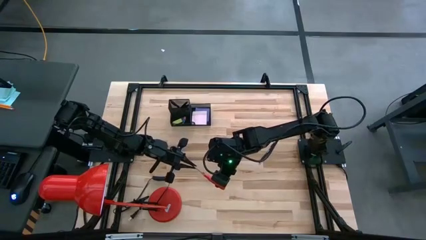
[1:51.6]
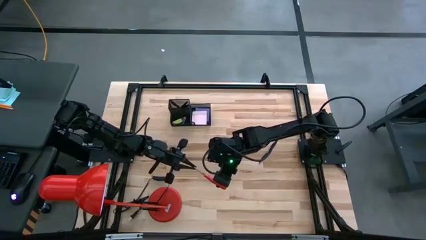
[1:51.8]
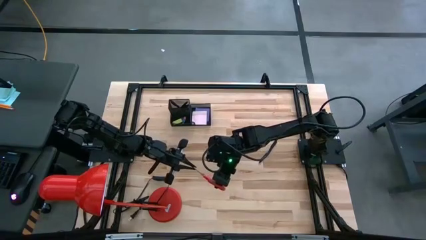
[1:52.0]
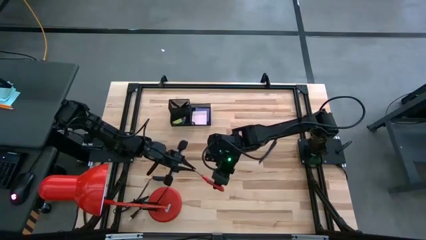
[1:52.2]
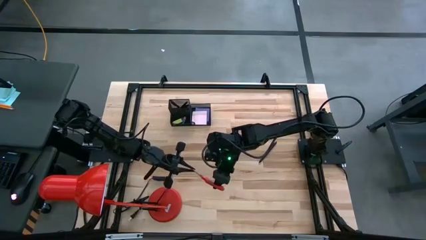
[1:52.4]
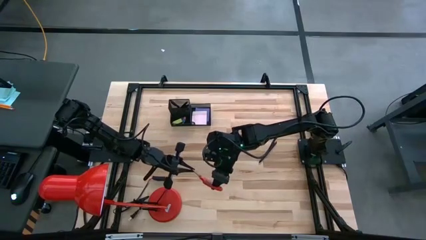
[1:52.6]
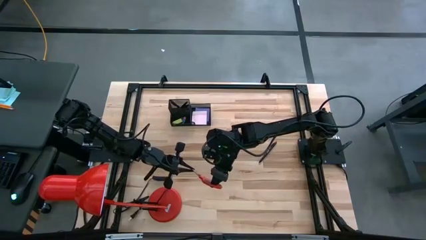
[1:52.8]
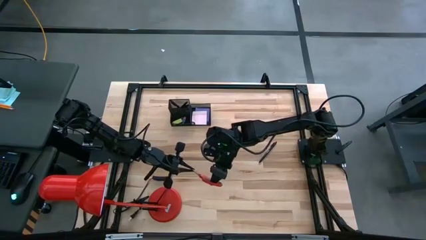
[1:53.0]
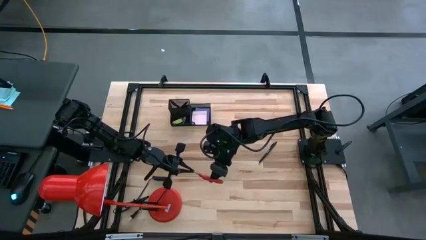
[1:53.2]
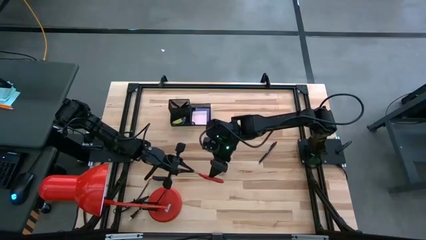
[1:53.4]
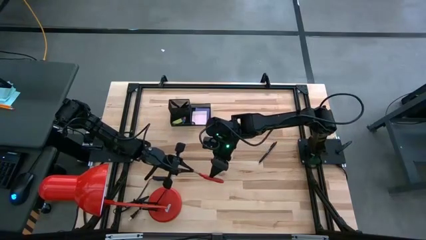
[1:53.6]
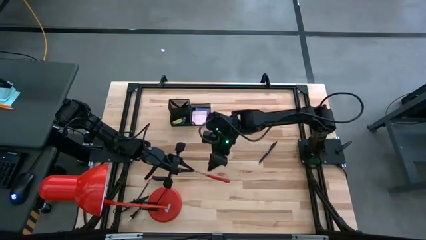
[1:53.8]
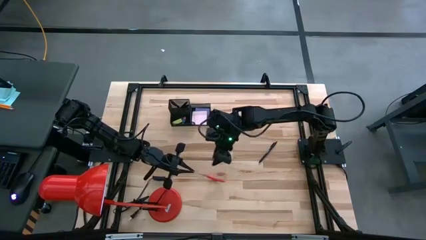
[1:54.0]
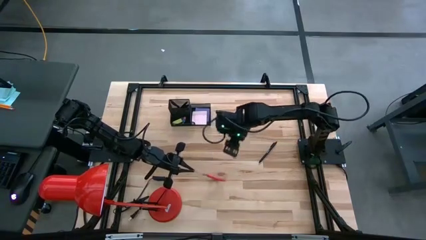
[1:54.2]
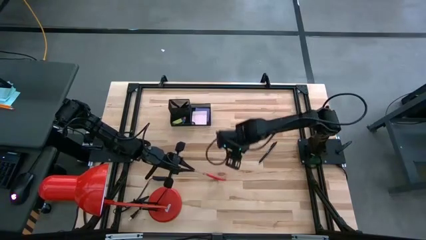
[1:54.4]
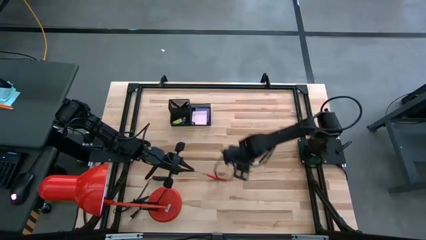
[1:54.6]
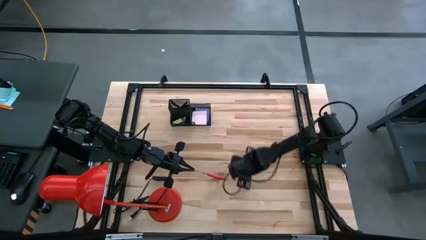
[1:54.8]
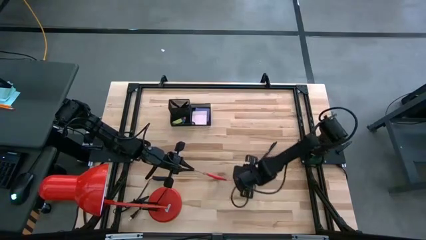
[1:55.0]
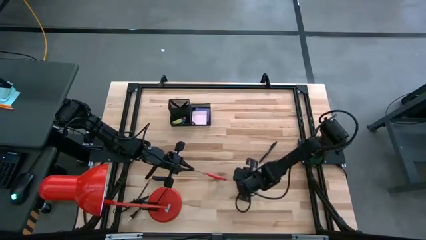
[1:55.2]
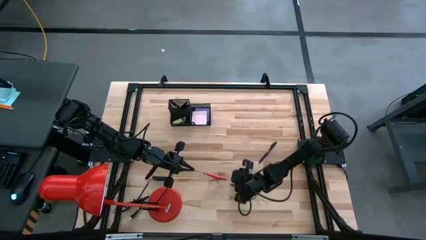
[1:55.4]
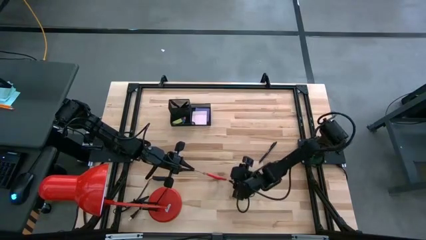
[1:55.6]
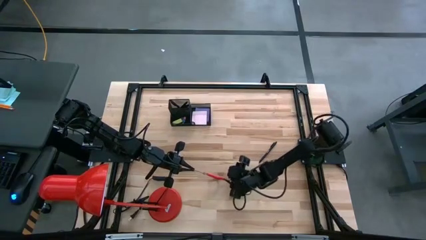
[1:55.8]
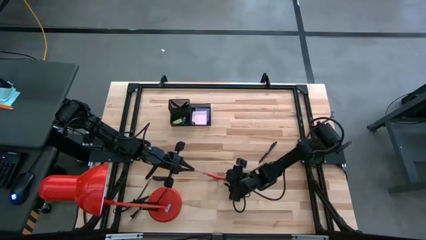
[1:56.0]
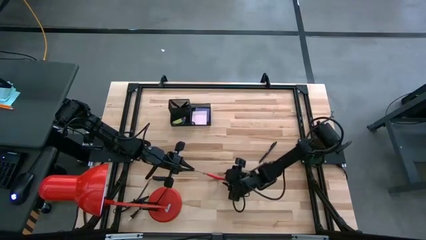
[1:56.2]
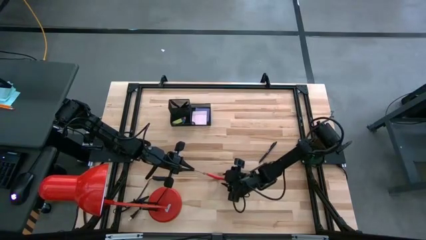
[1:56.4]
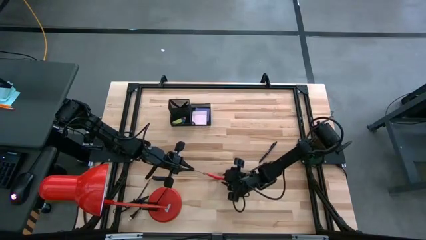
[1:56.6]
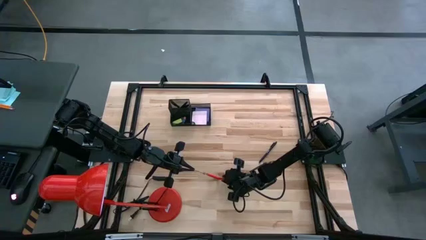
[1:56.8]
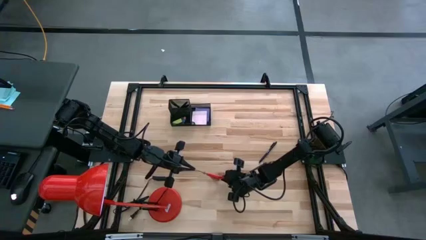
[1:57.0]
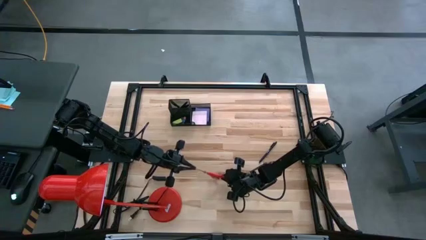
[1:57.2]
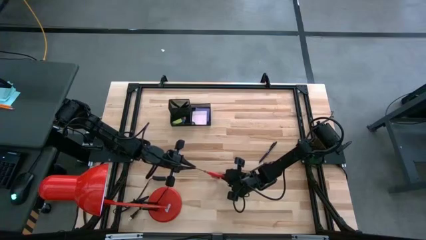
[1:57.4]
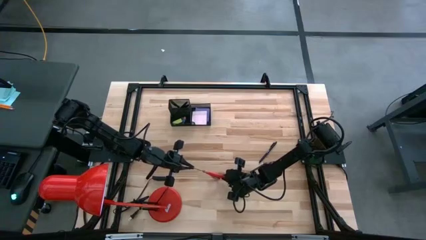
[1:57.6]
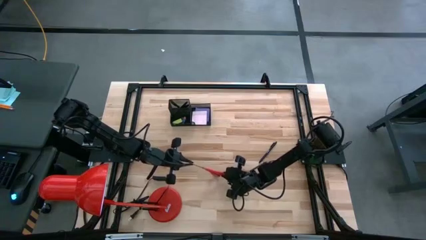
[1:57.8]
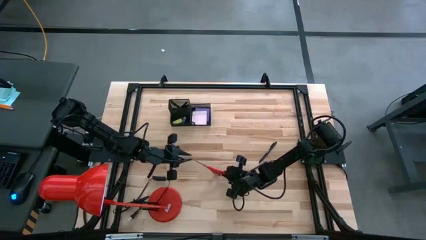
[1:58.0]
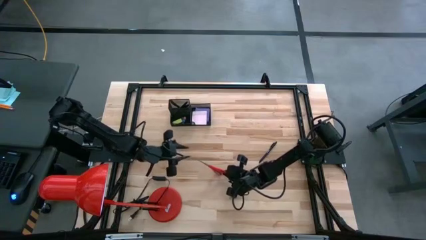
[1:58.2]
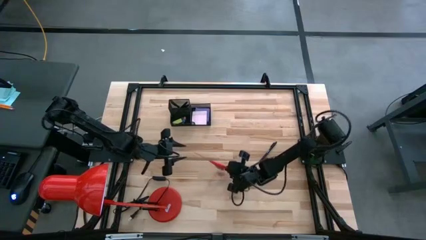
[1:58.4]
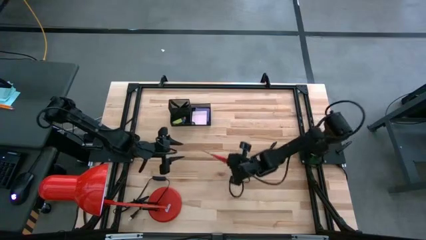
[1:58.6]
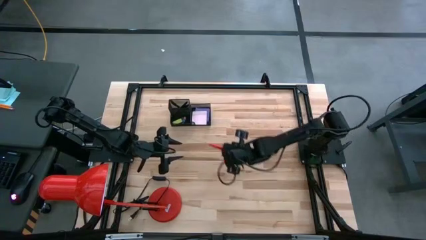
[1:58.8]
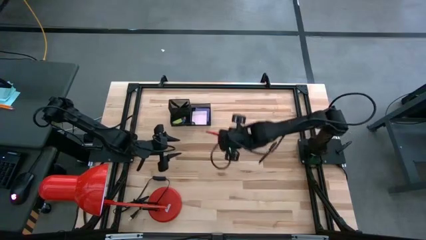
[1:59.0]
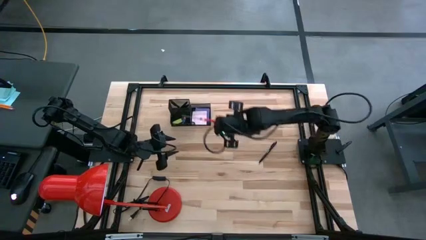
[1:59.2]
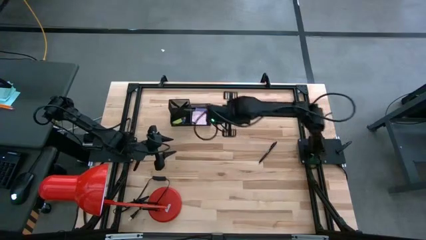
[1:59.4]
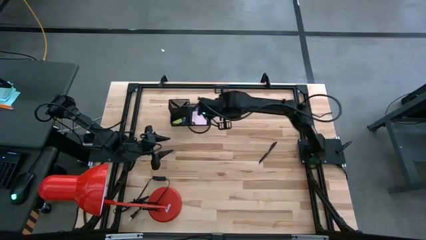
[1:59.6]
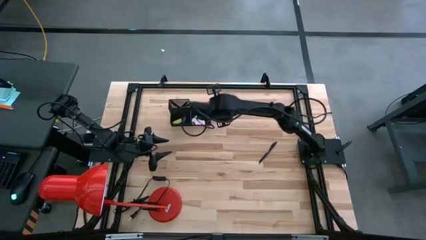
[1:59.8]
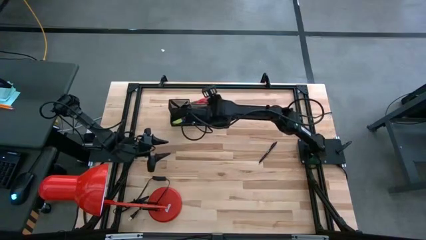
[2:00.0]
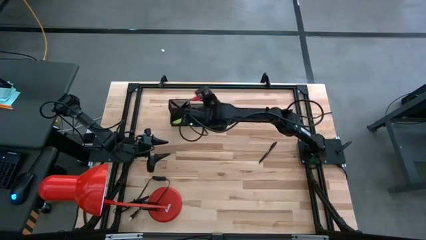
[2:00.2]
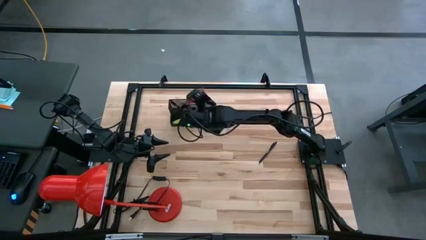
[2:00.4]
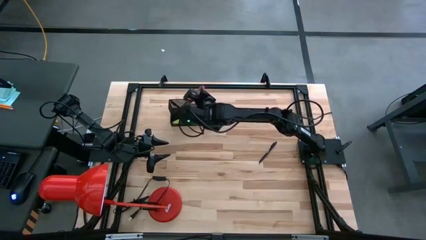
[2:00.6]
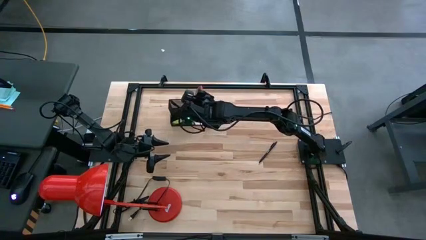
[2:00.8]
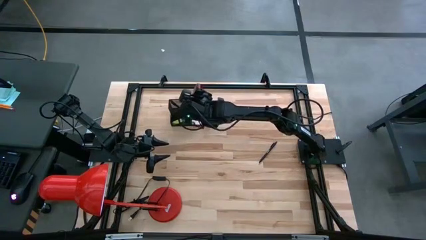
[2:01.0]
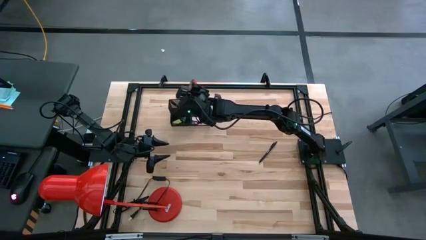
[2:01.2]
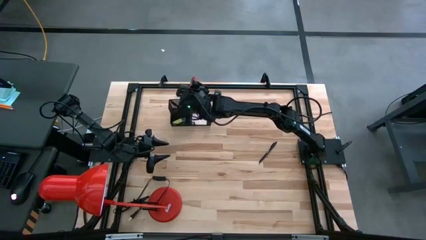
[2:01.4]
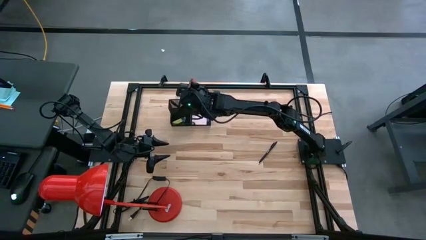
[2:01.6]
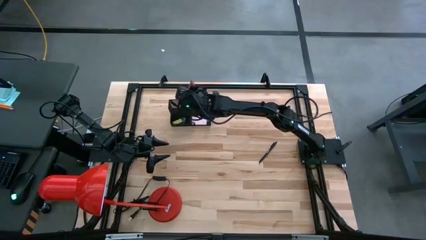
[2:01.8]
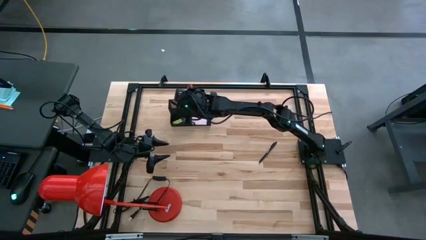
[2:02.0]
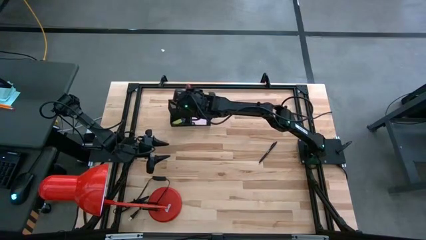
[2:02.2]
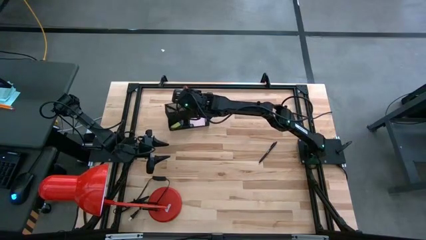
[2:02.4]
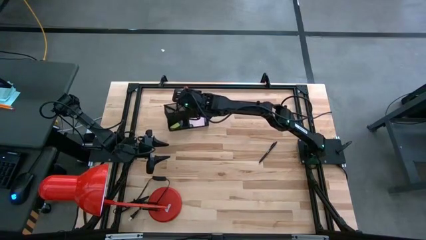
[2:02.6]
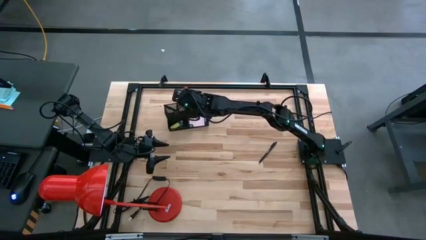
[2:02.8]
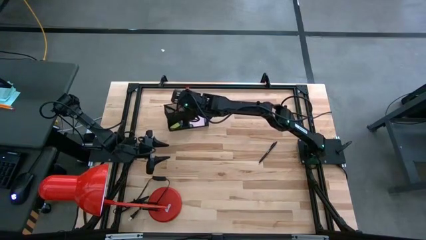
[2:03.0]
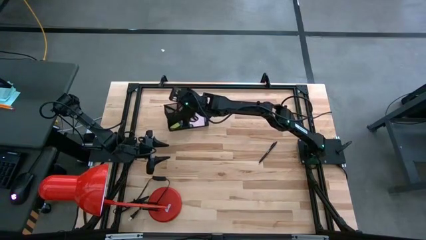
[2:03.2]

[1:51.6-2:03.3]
Task: Pick and place office supplies into organizer
Put the red scissors into the desk organizer

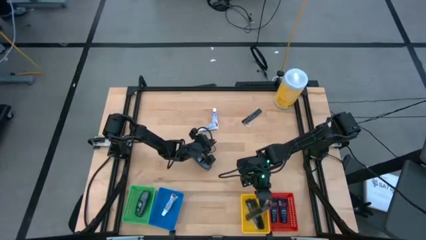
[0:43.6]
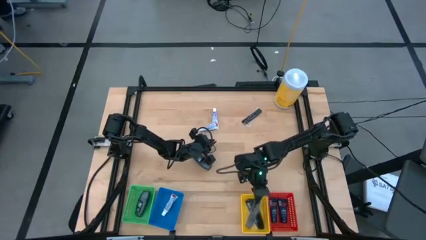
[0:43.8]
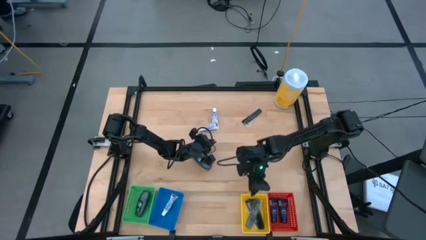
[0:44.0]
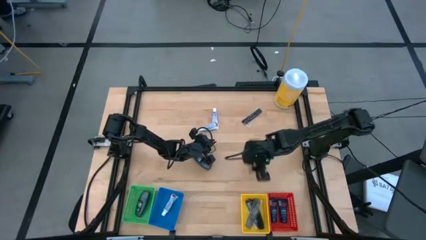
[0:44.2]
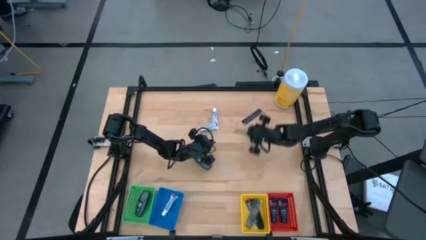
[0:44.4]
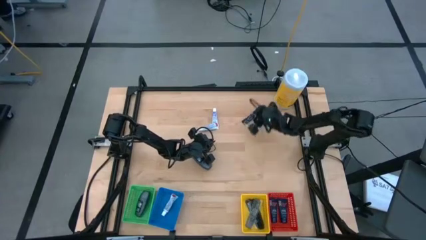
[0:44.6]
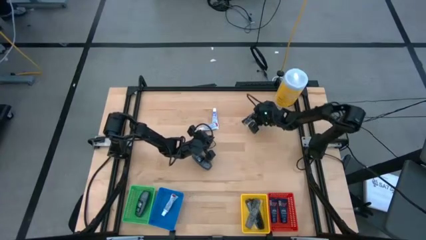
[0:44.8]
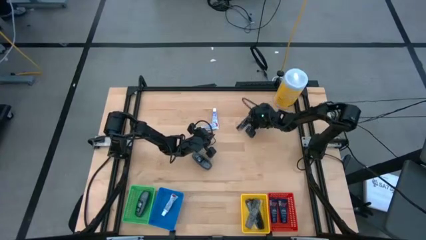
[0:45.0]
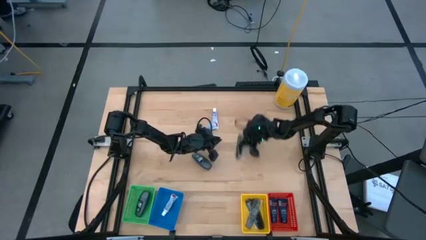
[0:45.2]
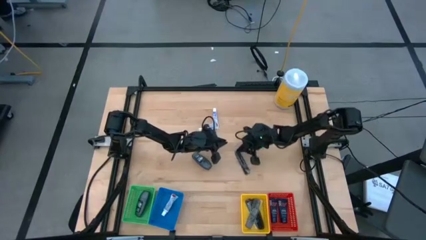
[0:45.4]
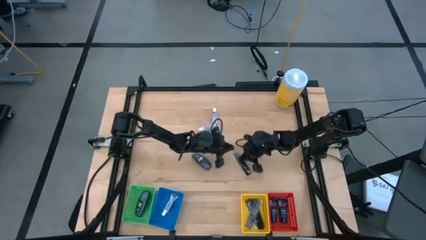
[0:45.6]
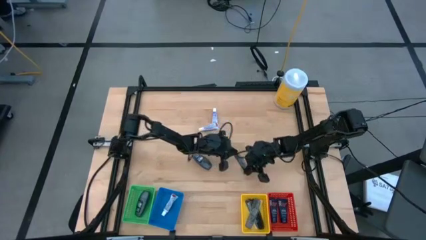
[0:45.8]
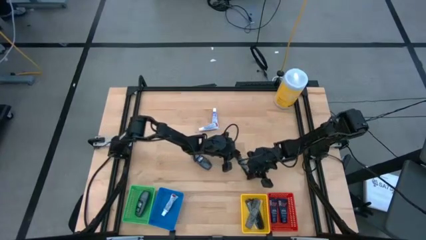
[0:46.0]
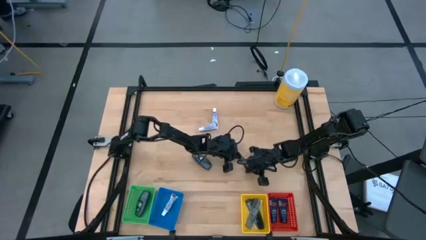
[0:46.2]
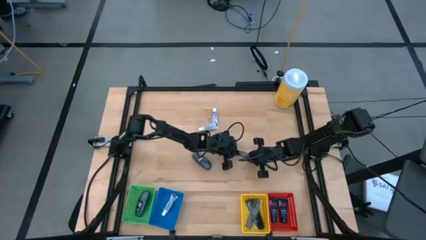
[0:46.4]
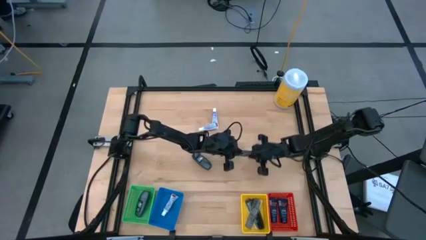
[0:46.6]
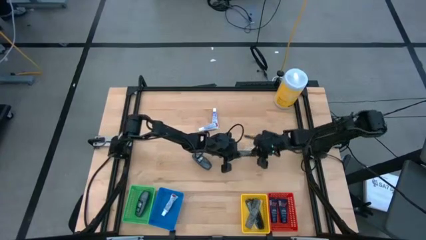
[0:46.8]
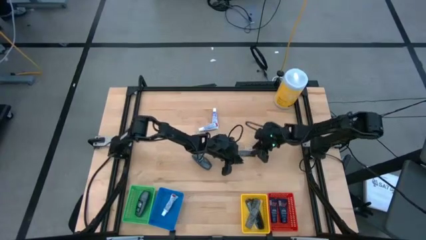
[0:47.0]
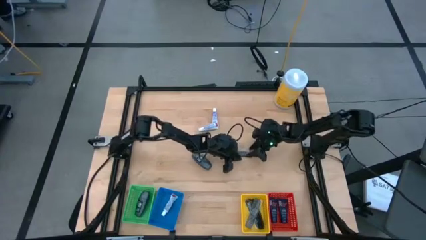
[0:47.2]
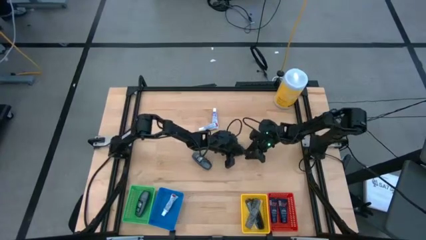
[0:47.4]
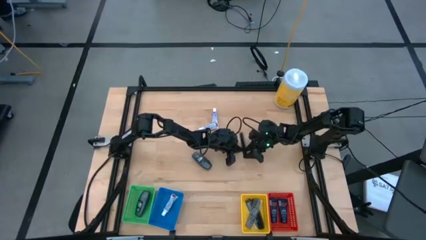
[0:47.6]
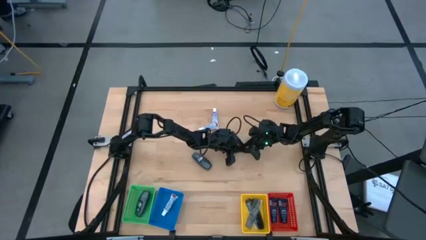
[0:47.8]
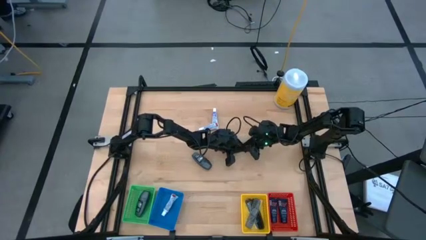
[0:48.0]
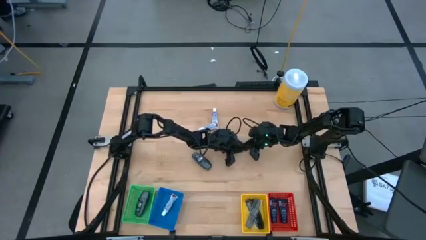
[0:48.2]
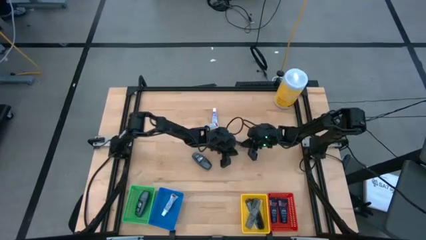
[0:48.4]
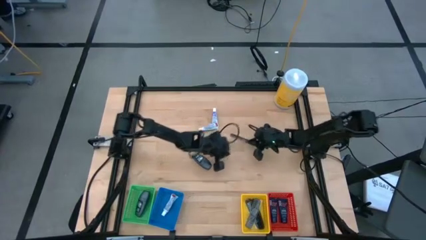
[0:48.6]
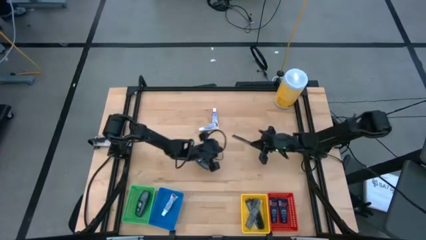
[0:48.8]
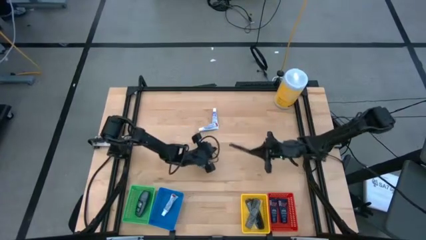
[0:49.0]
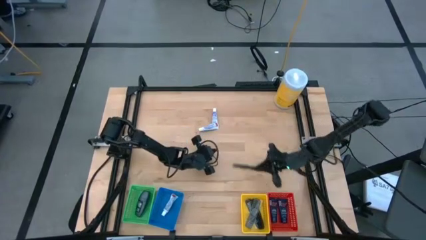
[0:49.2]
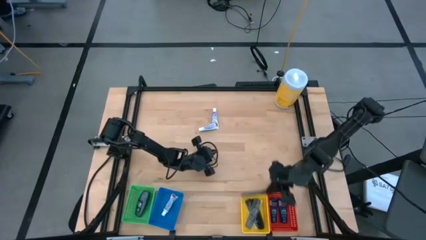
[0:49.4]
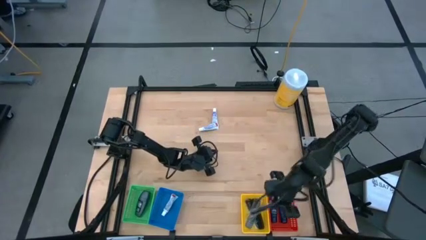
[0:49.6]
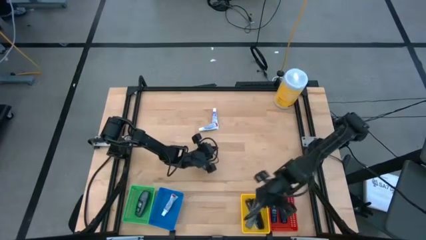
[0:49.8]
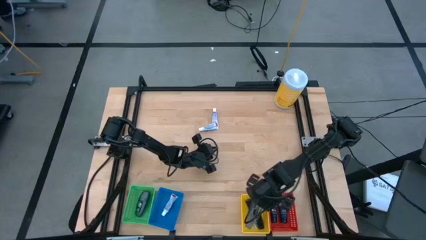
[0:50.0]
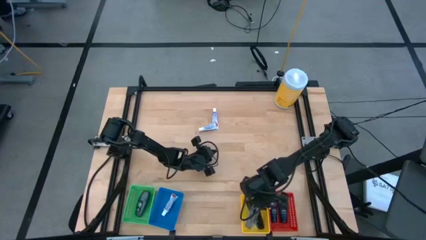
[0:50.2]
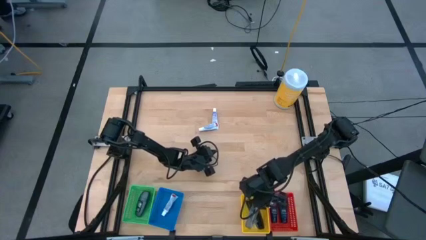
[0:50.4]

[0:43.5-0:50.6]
Task: Pick & Place Travel size toiletries
Put the black comb into the yellow bin
